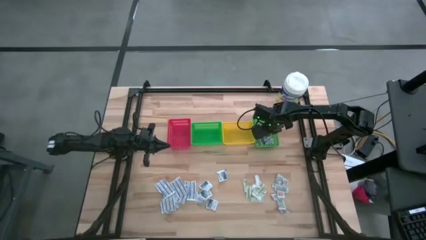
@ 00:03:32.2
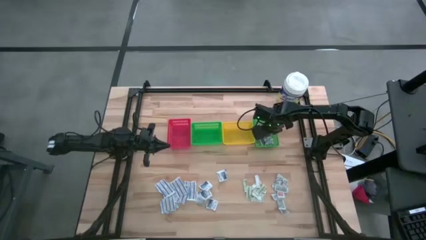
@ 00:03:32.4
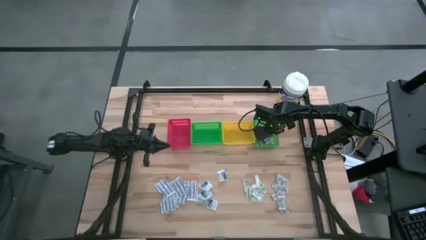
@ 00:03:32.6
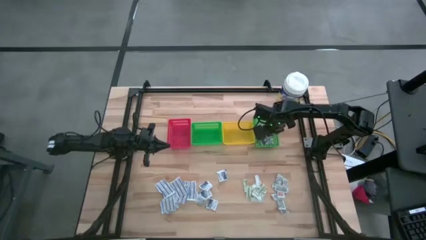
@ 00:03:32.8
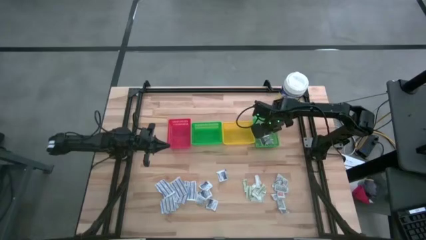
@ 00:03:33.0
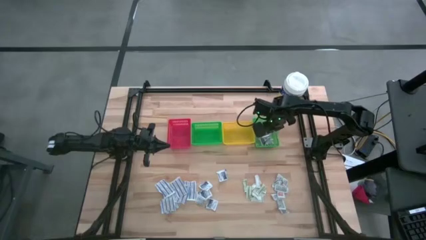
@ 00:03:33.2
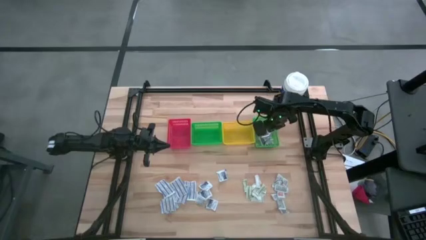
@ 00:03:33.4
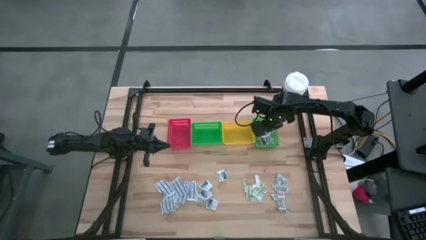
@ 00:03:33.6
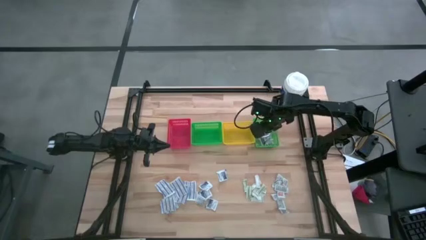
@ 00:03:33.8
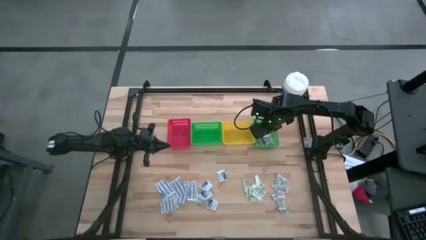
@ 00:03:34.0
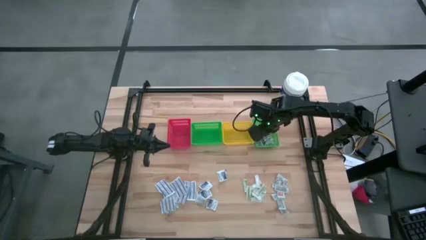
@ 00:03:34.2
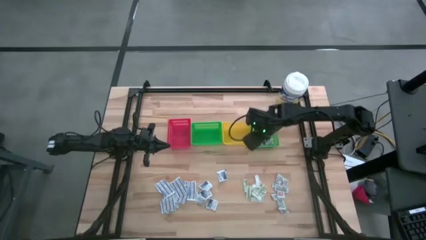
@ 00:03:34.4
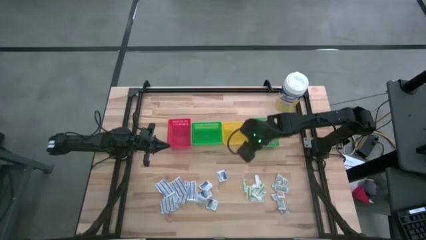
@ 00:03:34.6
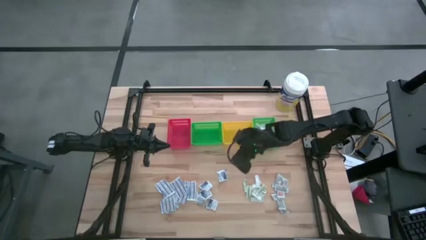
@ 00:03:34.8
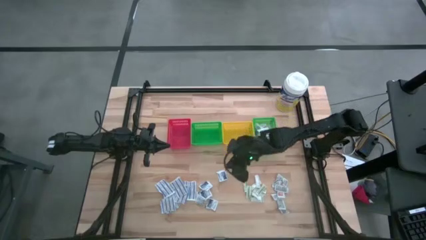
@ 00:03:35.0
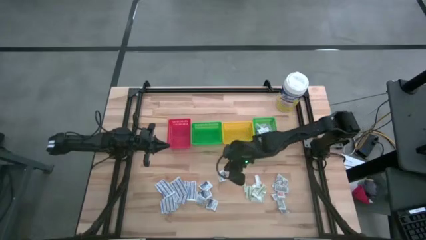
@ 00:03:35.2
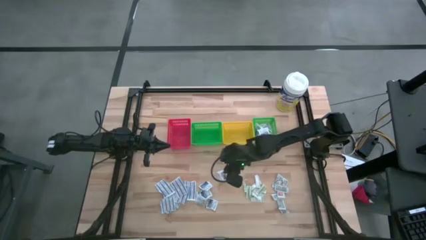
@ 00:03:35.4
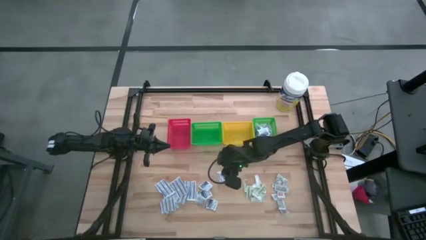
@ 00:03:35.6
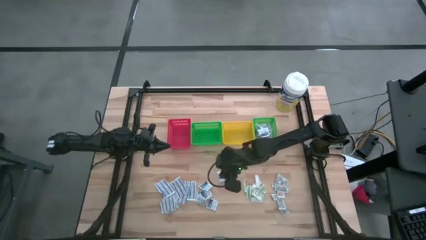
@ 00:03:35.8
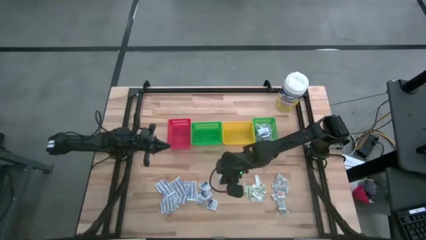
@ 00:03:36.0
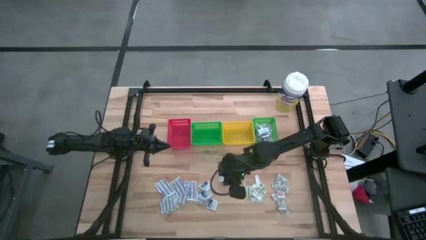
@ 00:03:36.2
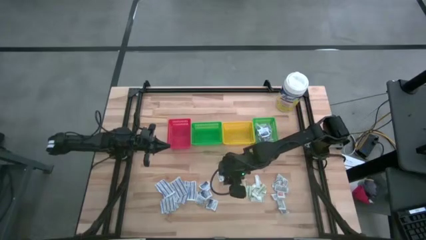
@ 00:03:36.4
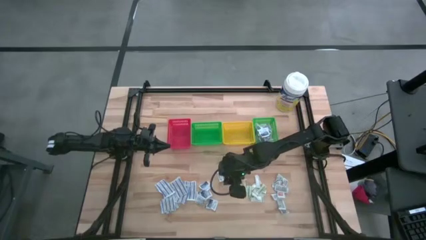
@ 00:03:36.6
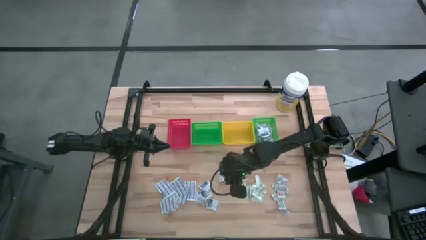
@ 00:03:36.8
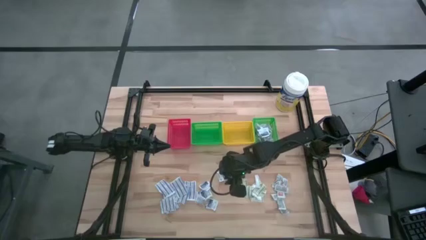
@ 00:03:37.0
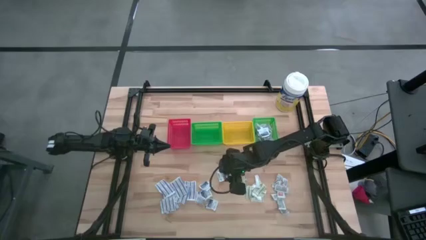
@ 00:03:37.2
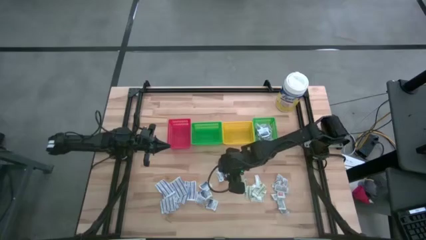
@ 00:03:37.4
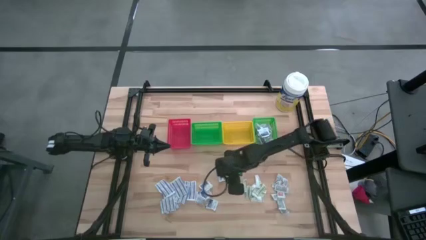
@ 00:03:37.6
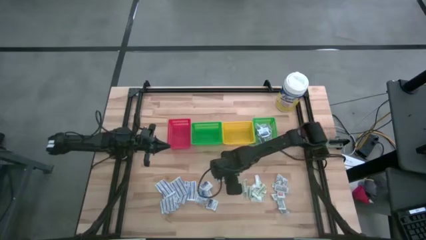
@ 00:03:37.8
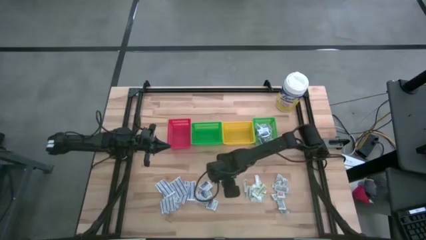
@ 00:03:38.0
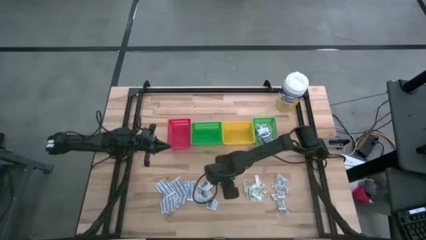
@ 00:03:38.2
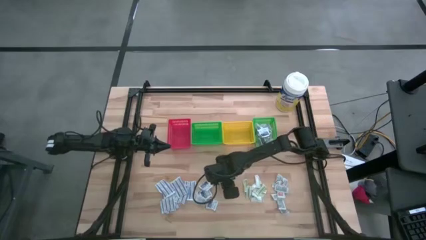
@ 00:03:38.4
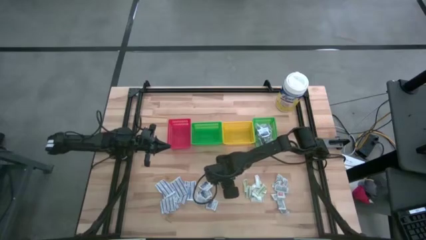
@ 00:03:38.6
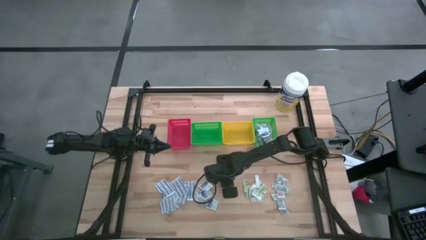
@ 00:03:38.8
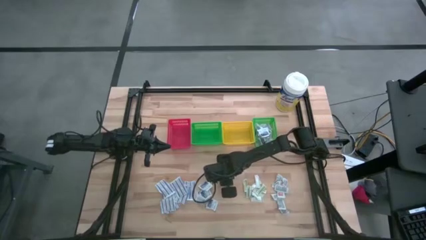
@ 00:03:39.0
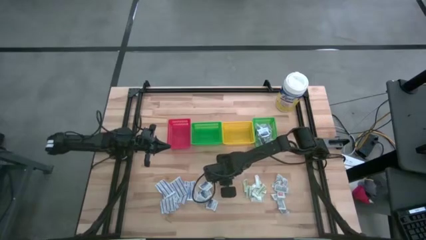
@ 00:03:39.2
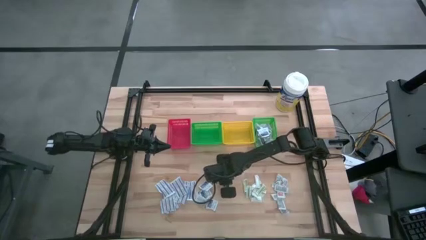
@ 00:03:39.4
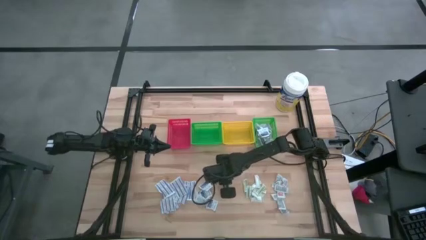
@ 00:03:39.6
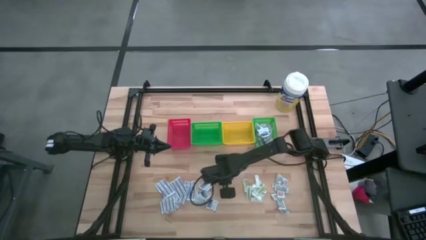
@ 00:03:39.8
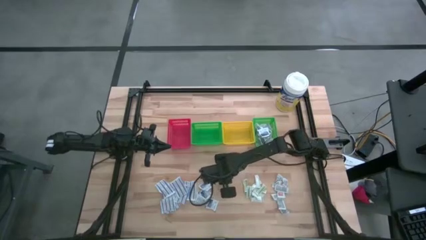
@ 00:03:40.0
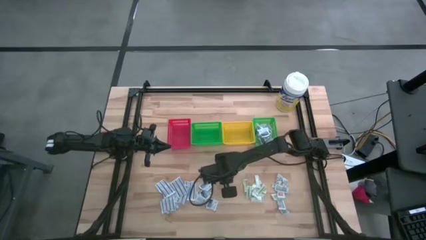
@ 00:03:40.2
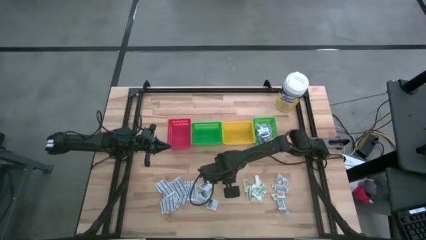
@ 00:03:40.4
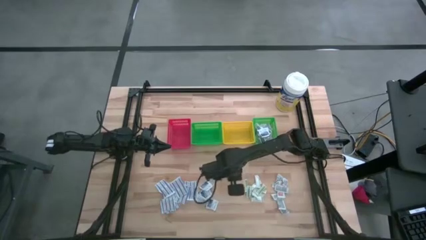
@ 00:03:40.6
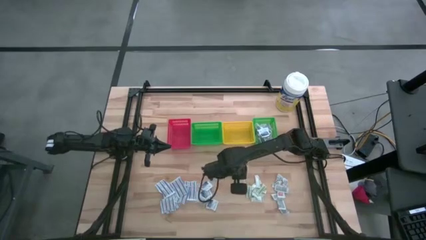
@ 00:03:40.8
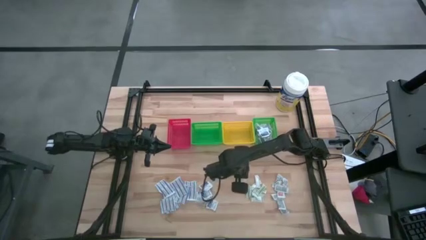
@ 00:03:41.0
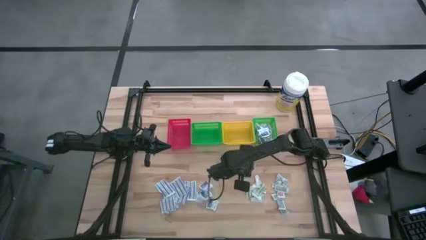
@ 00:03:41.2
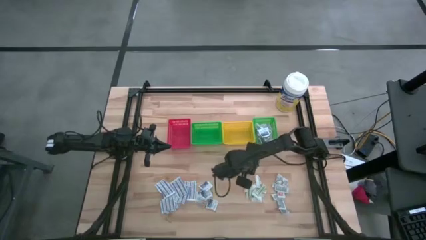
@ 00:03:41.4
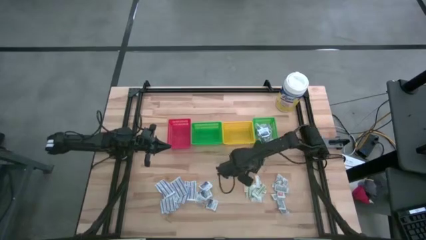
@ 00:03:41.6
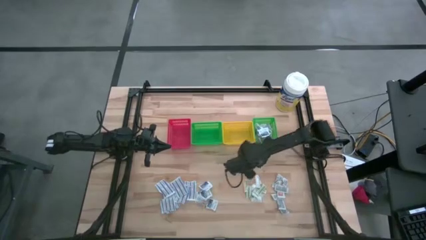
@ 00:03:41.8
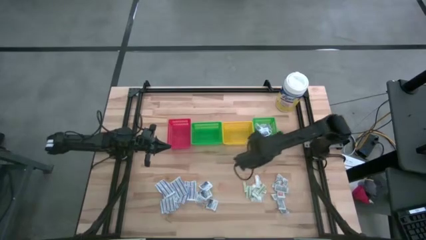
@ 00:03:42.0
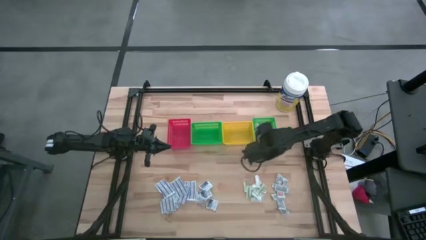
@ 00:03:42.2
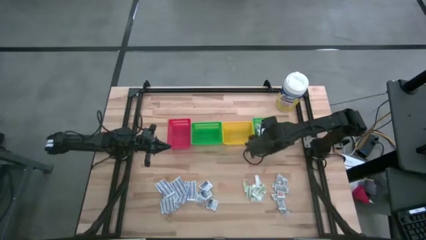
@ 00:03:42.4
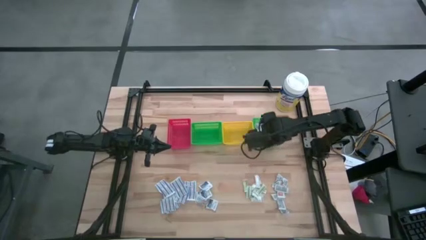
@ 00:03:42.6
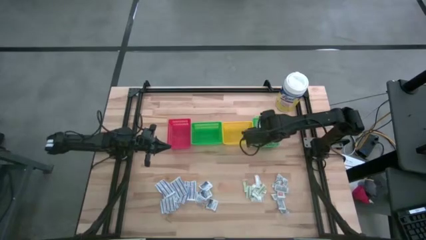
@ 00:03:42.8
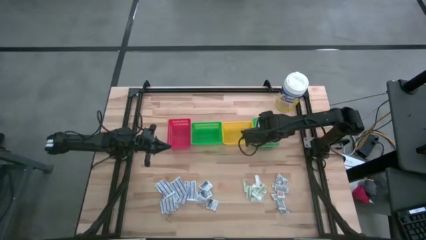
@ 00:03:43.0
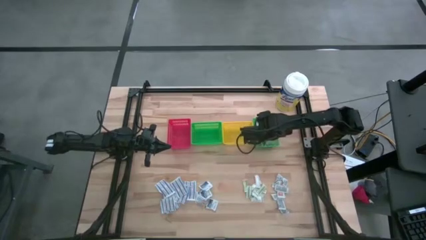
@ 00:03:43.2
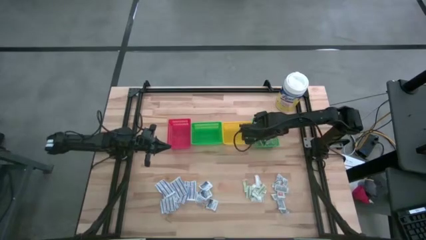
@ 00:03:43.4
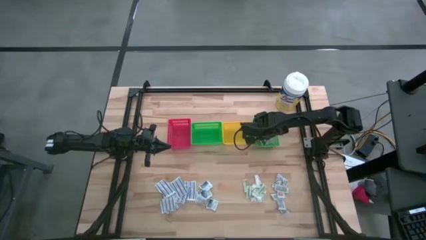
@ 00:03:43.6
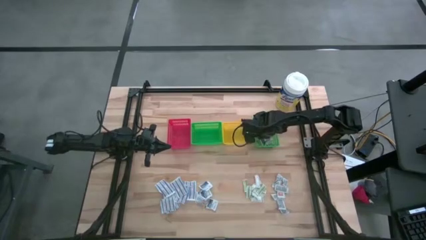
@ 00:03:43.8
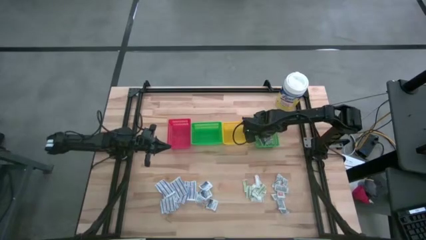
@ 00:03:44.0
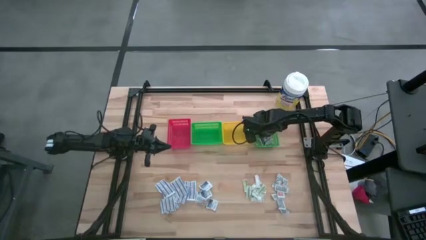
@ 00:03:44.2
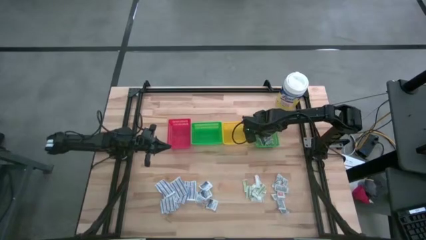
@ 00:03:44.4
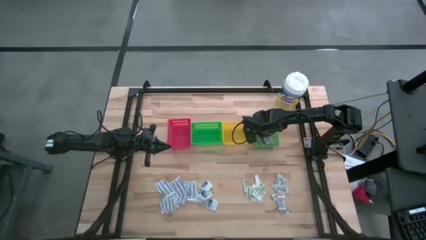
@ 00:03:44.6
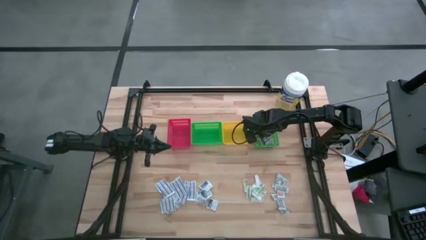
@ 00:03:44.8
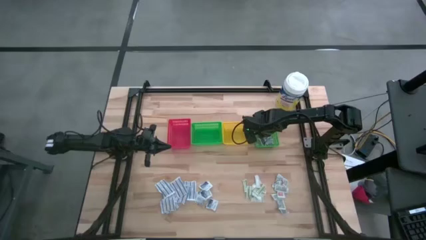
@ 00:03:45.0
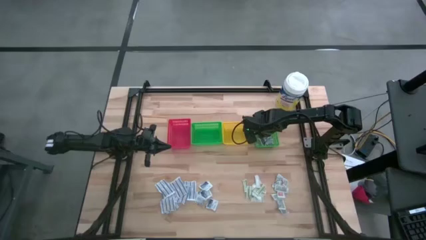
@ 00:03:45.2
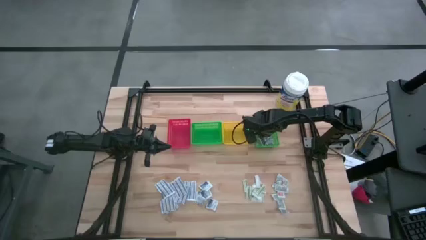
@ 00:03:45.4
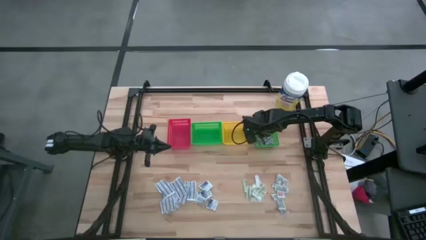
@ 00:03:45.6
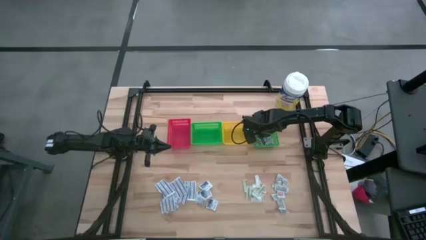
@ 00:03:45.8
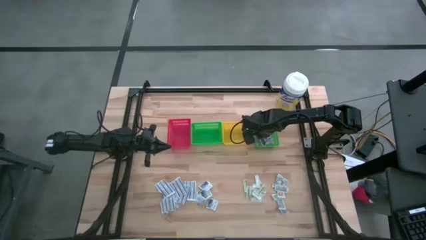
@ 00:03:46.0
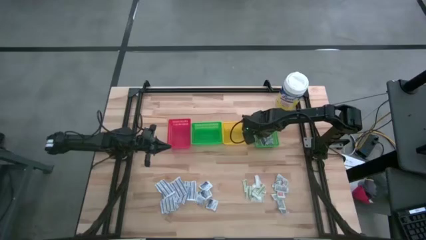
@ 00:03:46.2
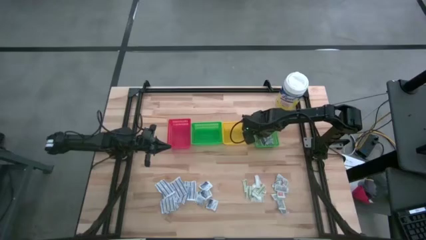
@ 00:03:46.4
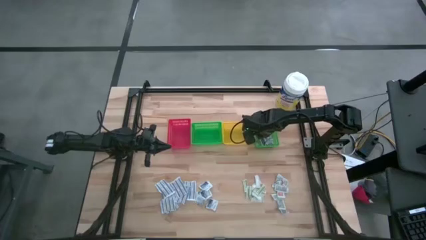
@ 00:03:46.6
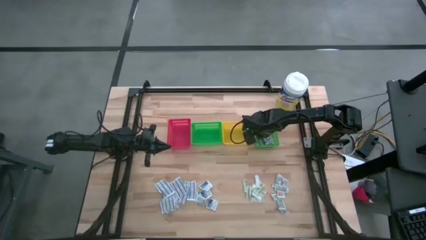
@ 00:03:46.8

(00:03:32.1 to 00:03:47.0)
Task: Pick & Place First Aid Supplies
Put the blue alcohol pad into the right green bin
